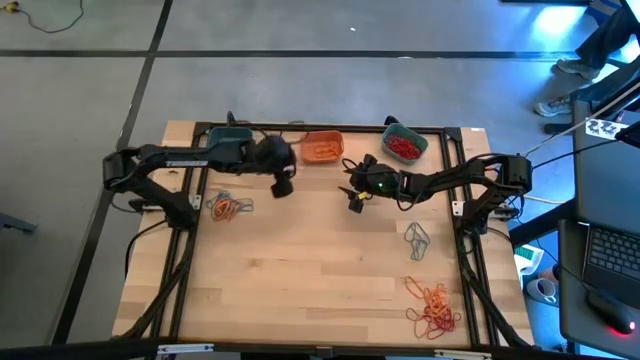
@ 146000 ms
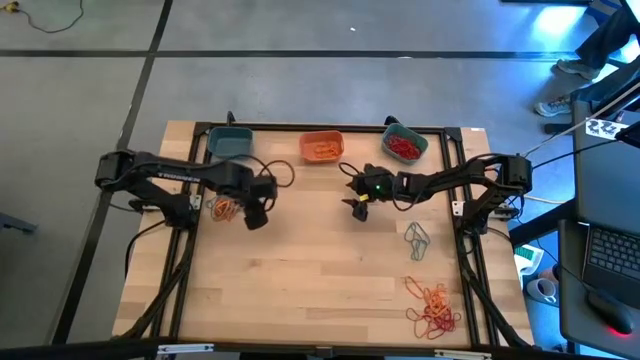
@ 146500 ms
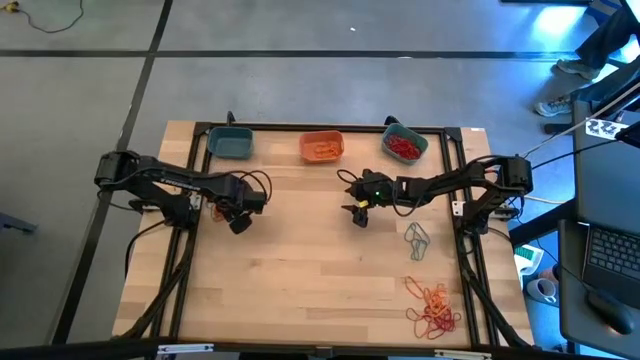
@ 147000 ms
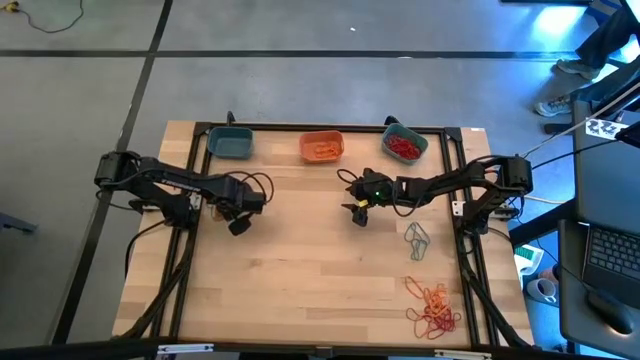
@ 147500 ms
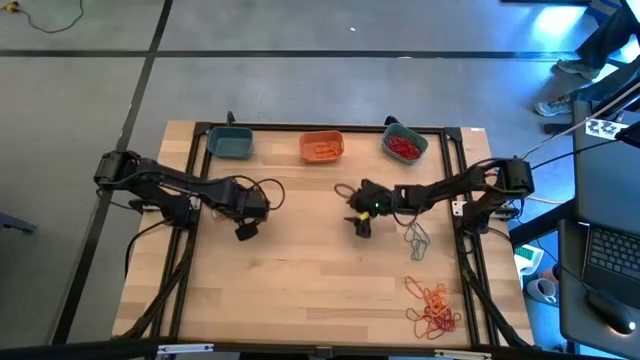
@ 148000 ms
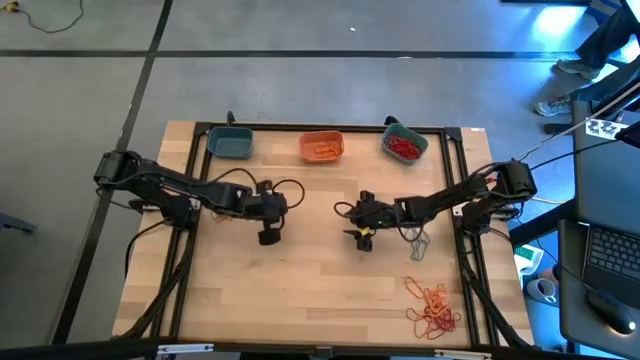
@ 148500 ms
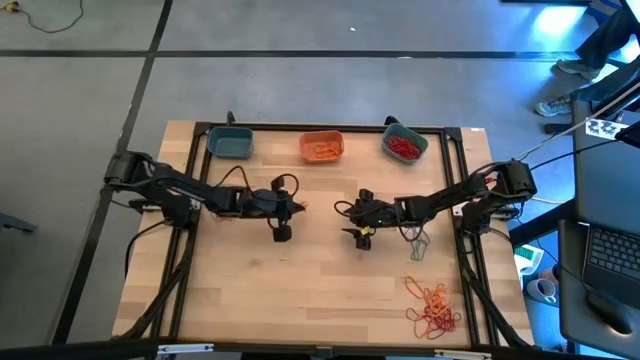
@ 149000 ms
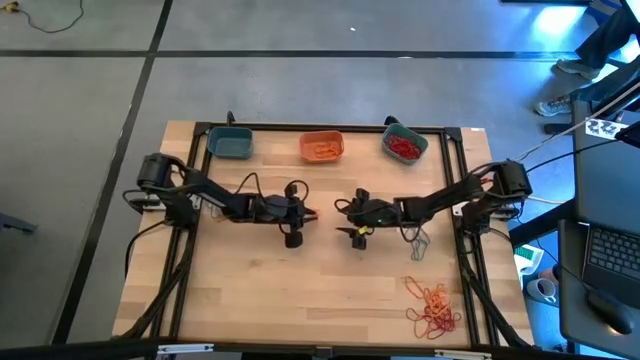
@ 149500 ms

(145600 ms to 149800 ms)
Task: Sort rubber bands into baskets
Put the orange rubber band into the orange bin

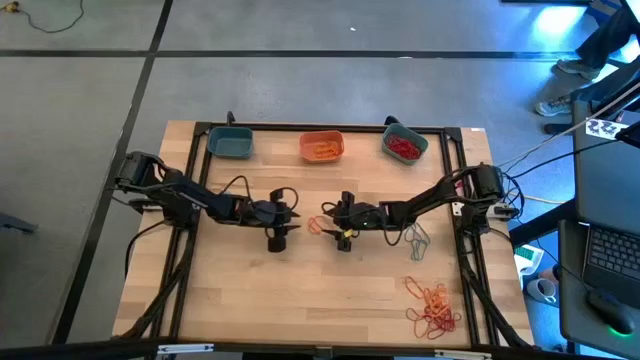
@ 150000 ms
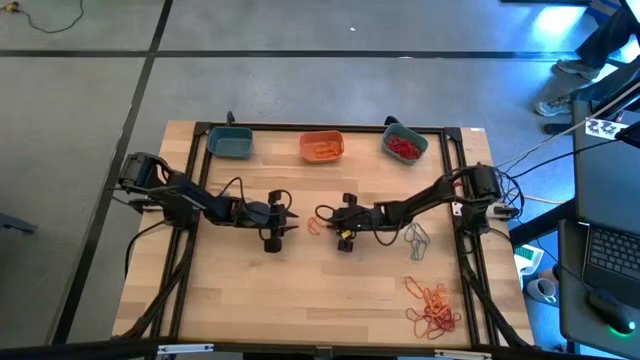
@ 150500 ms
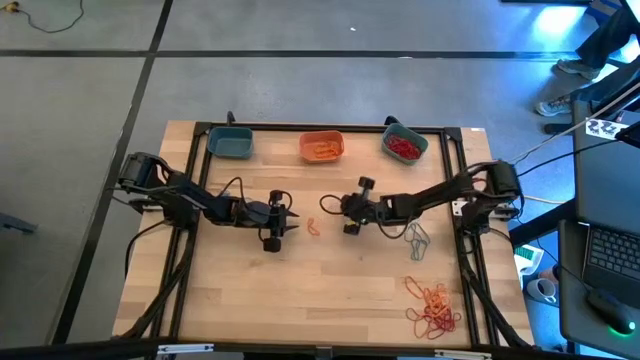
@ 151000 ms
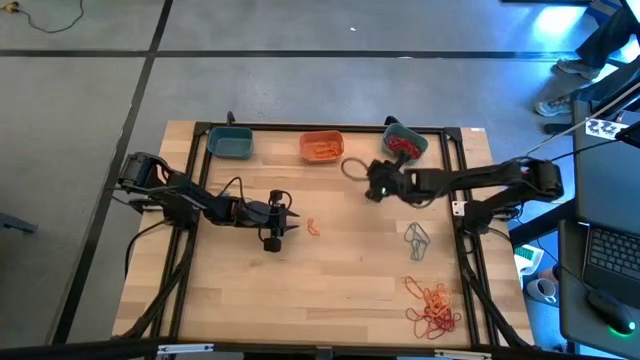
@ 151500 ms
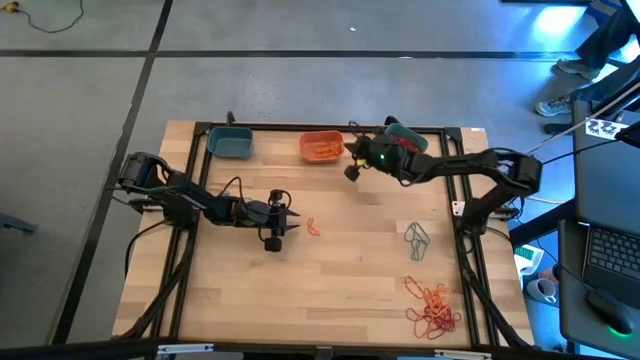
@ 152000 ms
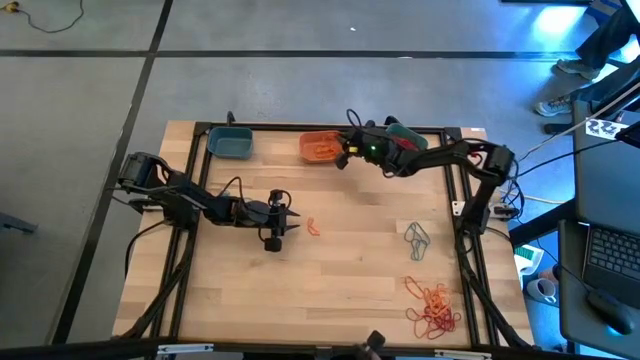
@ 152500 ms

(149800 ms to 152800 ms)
Put the orange rubber band into the orange bin

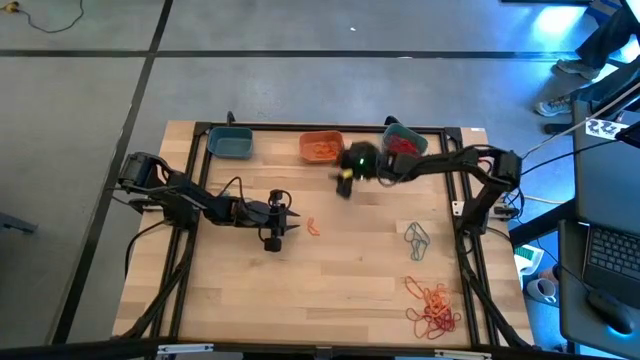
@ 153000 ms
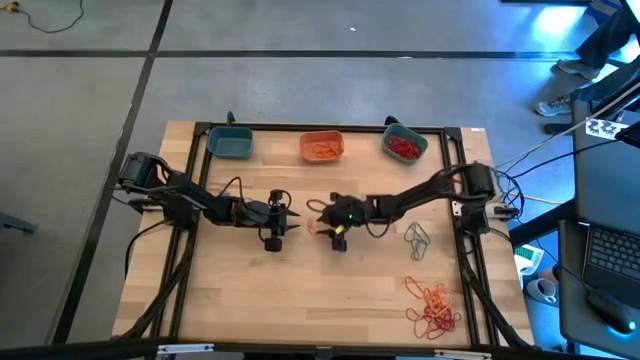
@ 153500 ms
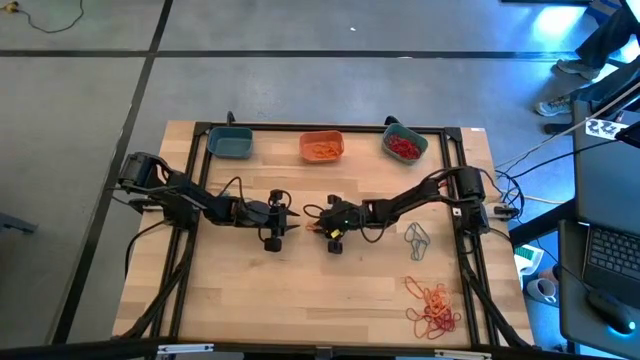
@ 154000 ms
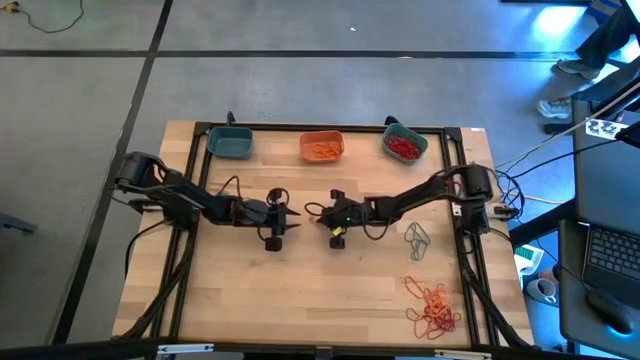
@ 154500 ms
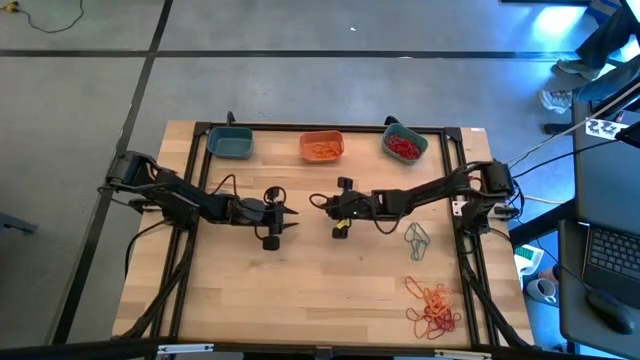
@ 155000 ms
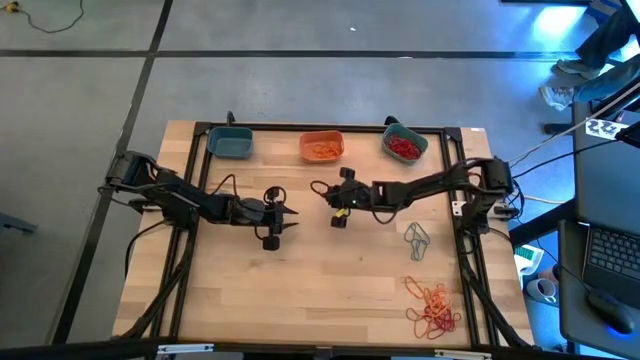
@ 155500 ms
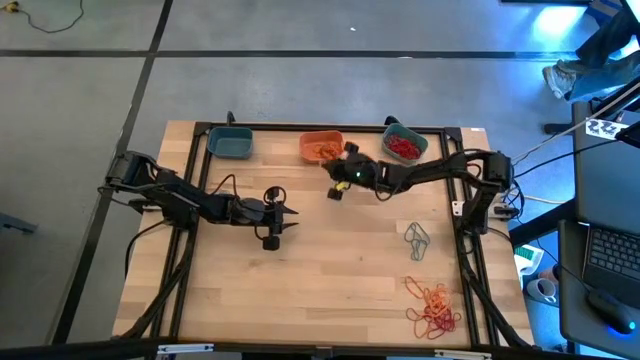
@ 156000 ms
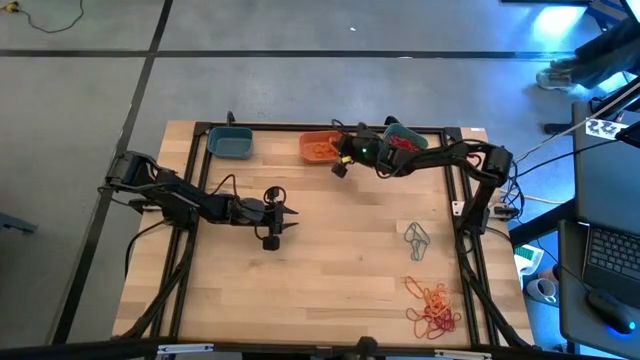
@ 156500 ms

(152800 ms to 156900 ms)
Put the orange rubber band into the orange bin

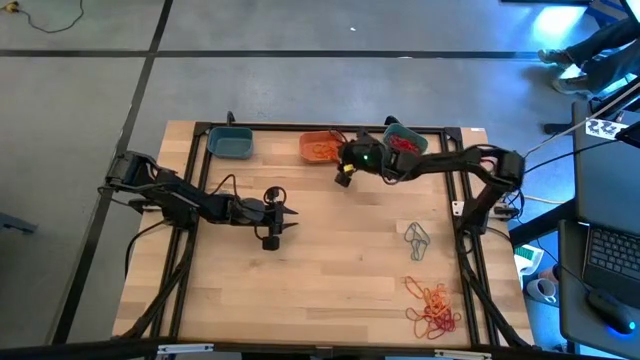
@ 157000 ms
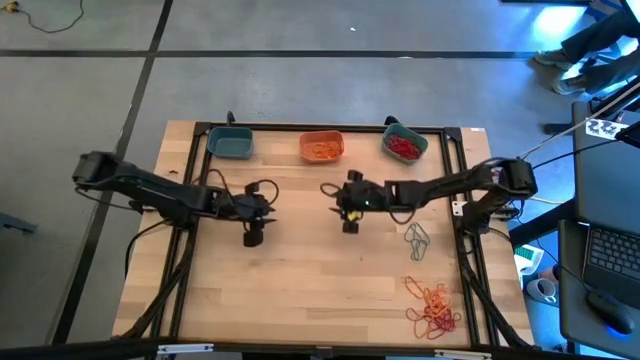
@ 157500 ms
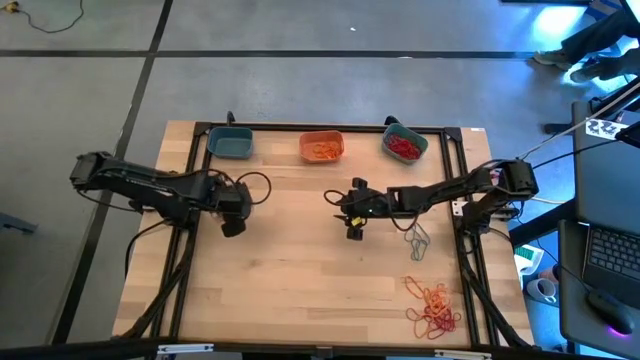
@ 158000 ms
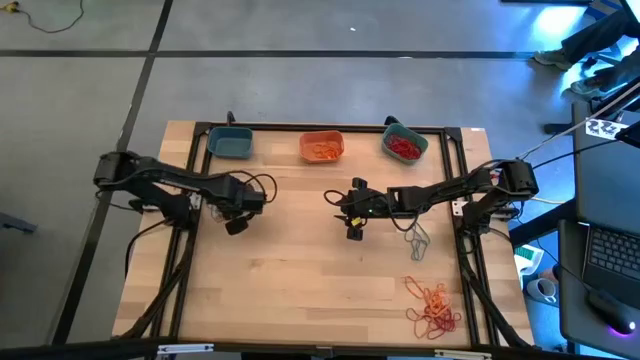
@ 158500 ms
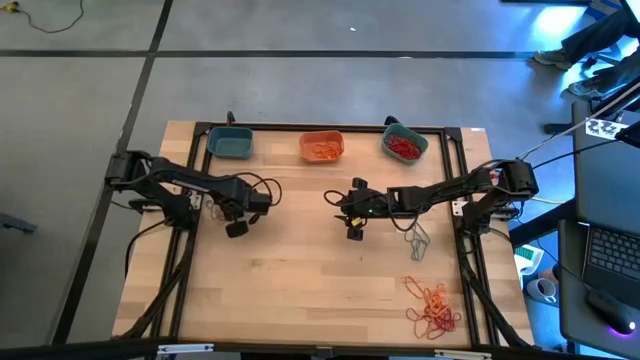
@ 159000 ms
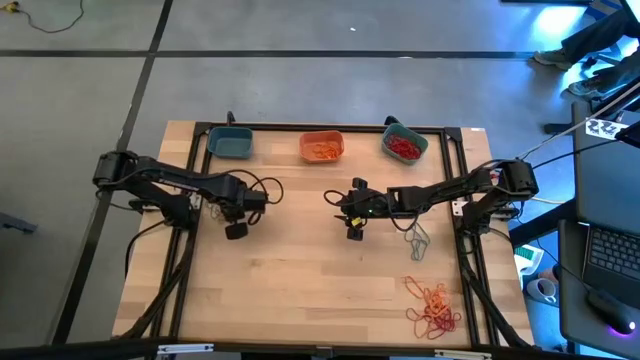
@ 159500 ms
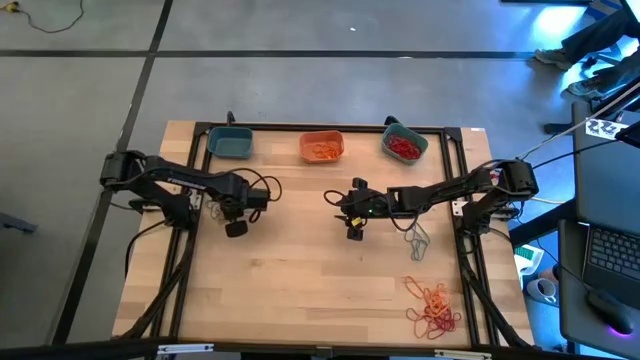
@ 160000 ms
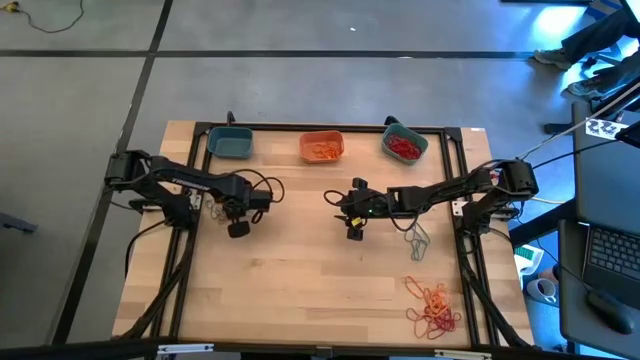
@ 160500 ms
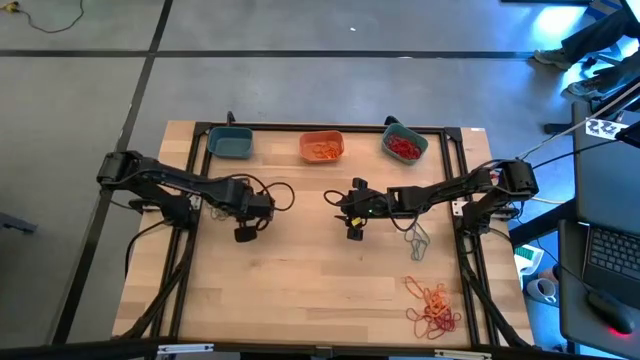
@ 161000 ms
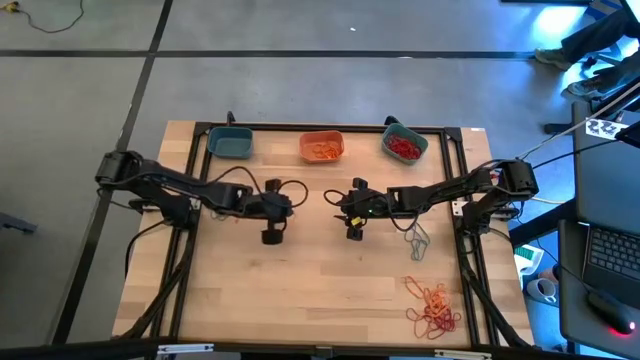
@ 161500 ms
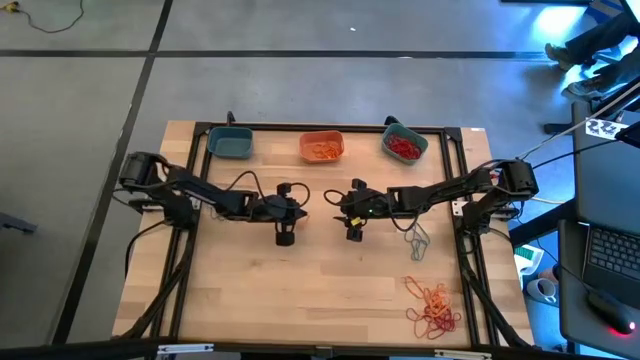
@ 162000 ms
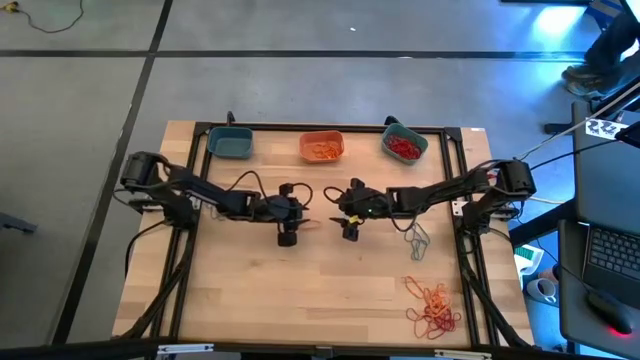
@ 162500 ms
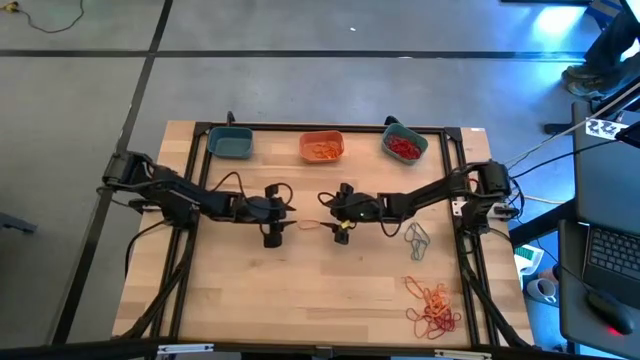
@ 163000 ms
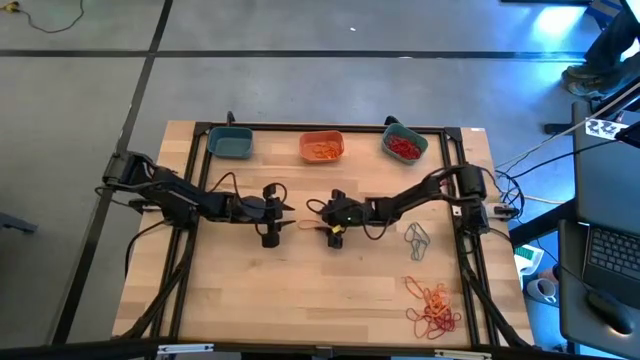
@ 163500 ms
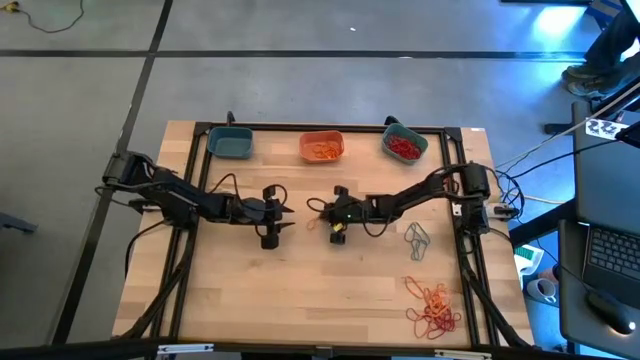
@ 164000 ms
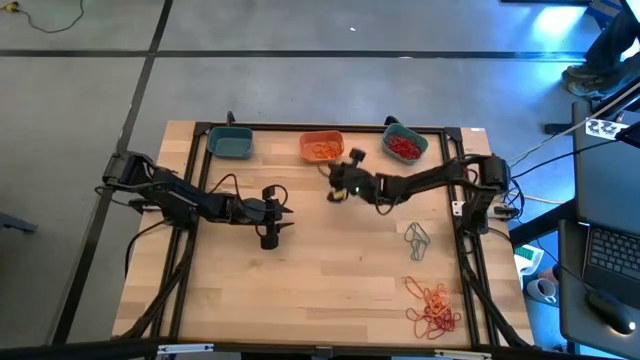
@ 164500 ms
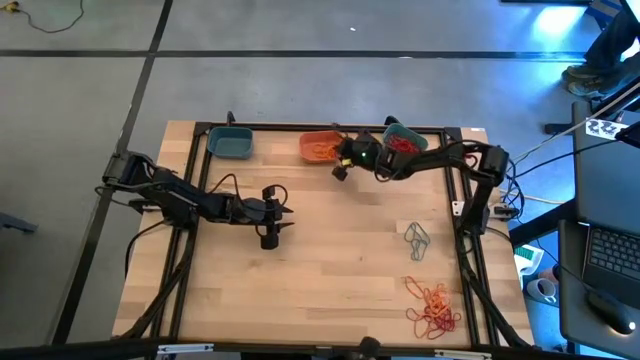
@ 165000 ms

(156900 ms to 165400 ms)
Put the orange rubber band into the orange bin
